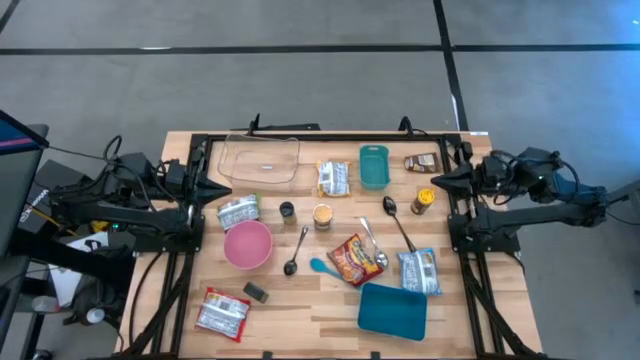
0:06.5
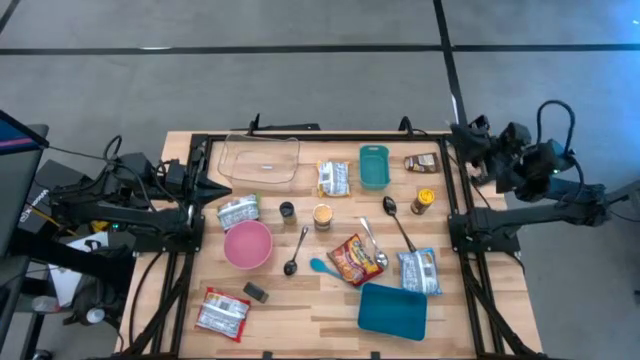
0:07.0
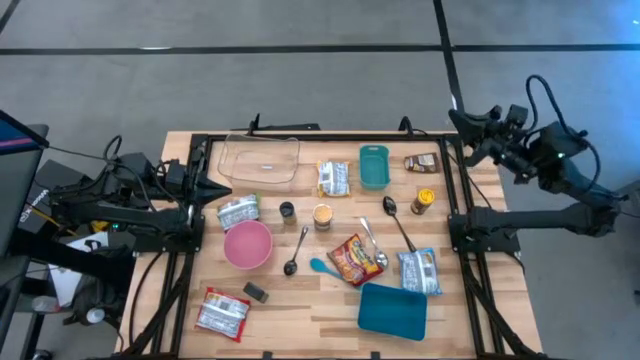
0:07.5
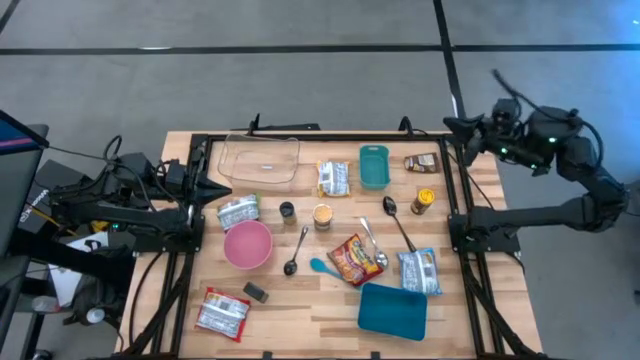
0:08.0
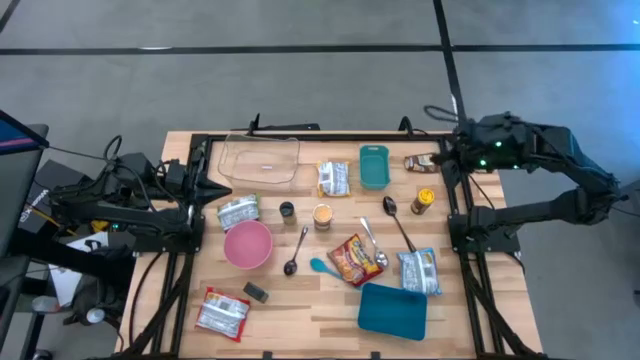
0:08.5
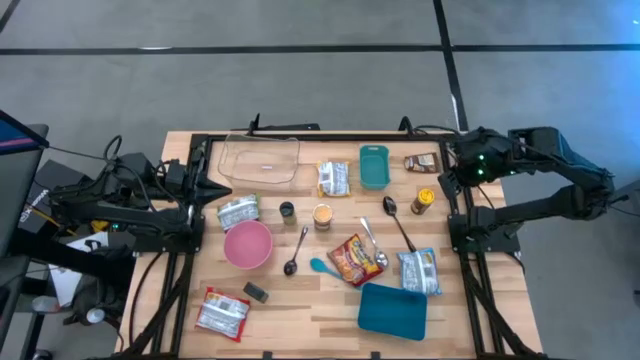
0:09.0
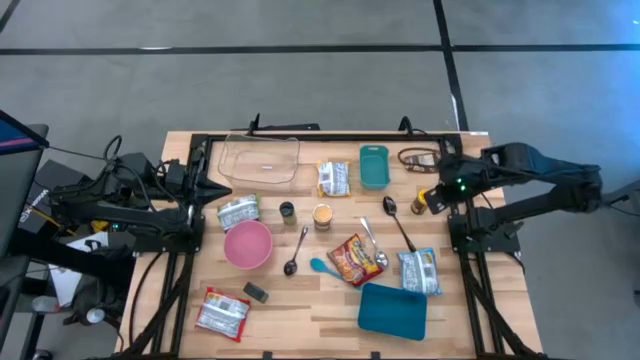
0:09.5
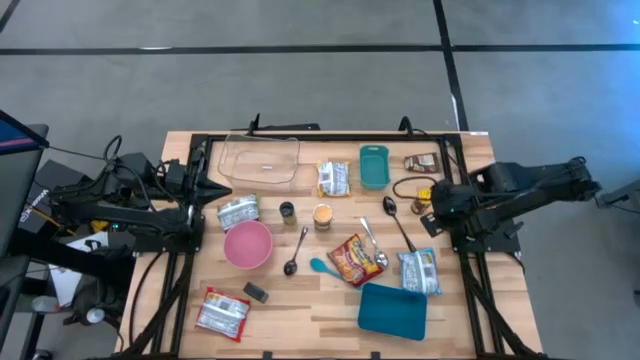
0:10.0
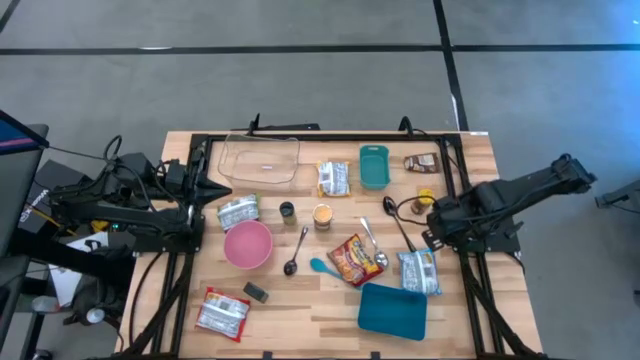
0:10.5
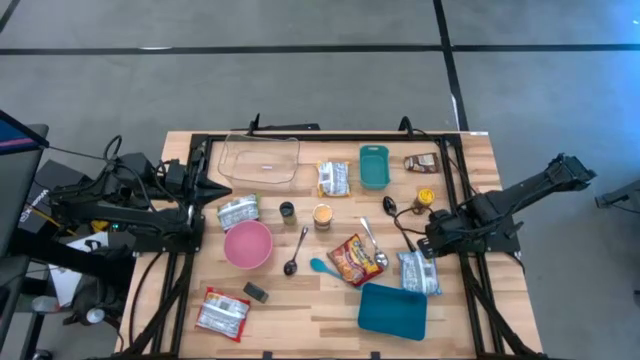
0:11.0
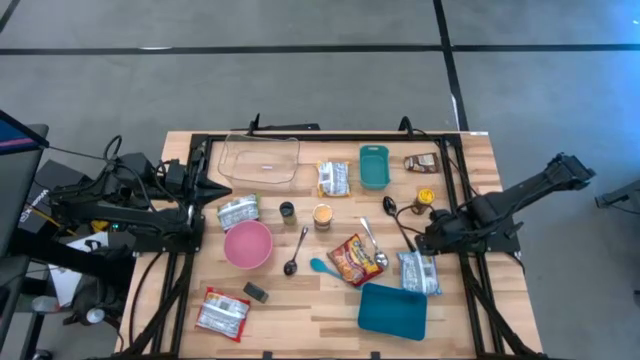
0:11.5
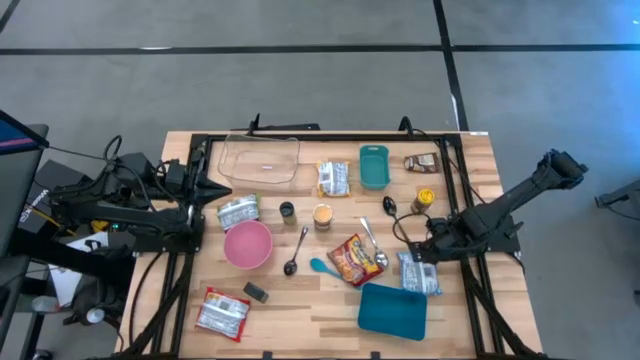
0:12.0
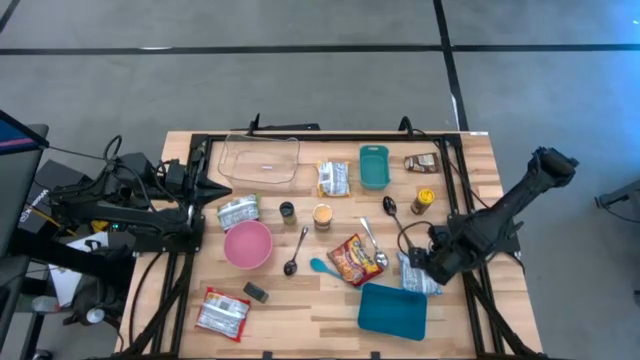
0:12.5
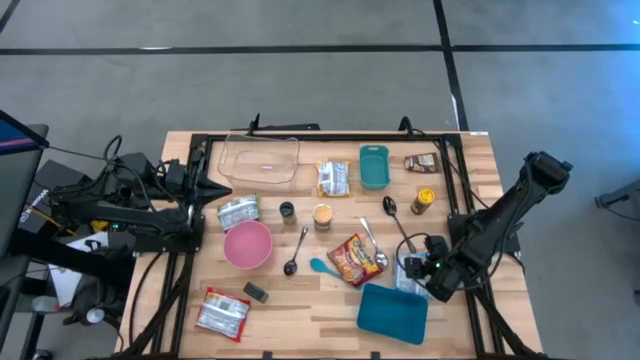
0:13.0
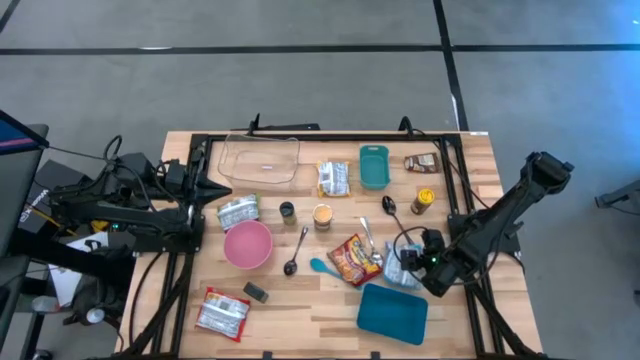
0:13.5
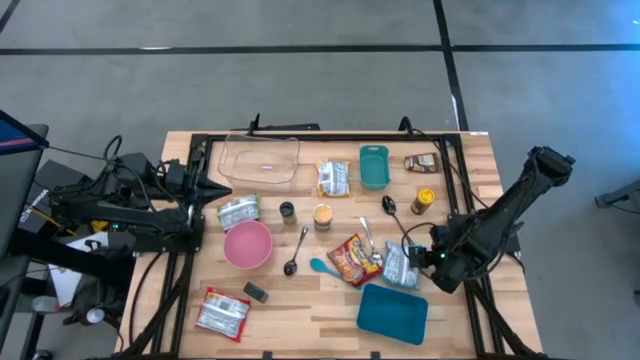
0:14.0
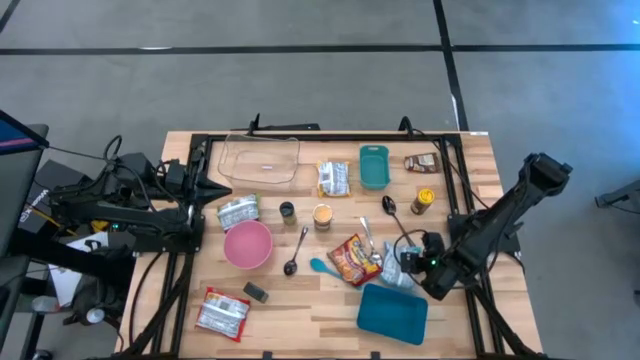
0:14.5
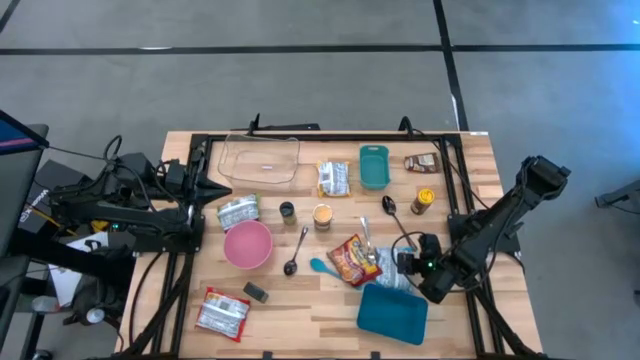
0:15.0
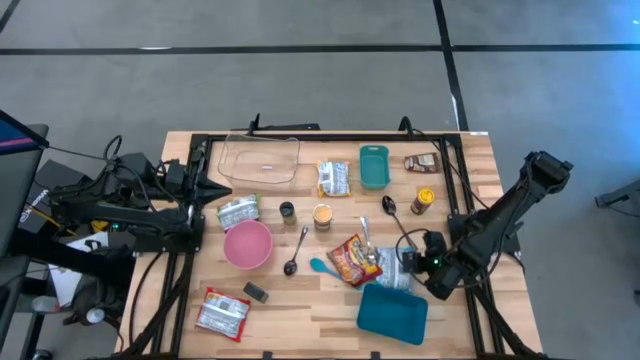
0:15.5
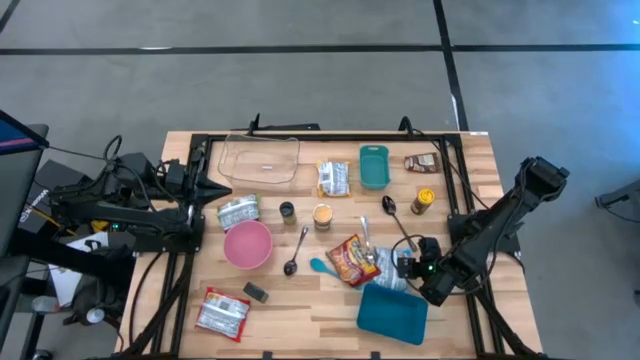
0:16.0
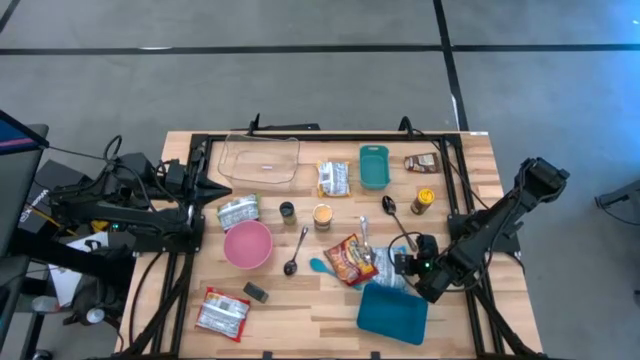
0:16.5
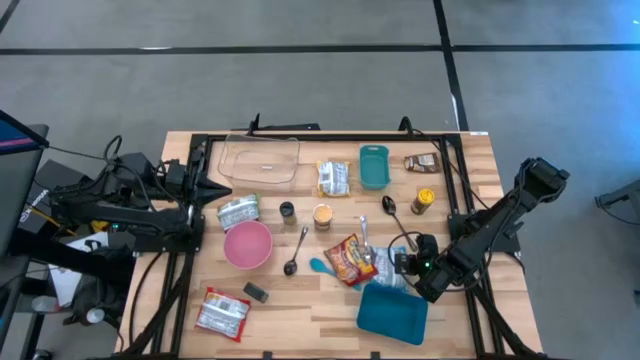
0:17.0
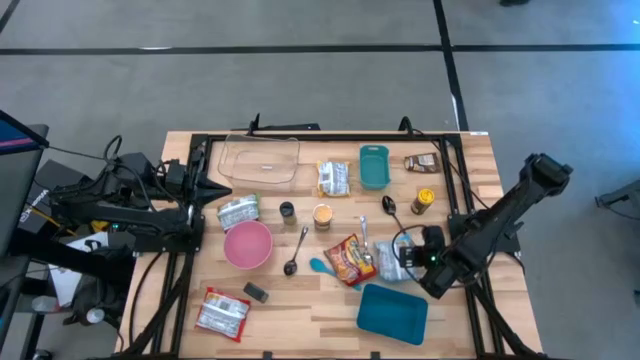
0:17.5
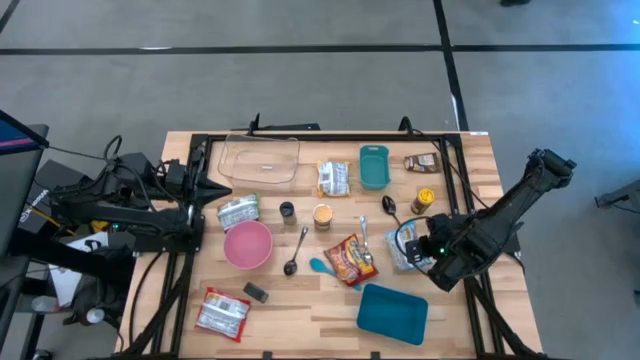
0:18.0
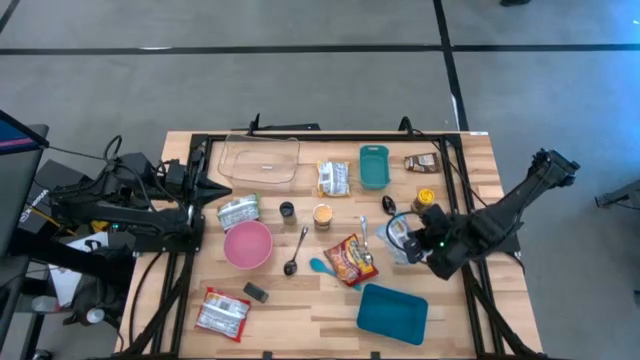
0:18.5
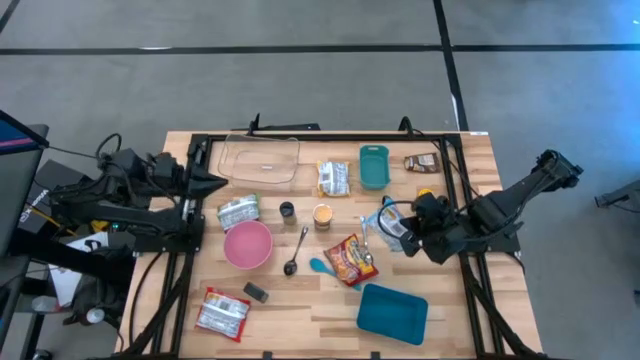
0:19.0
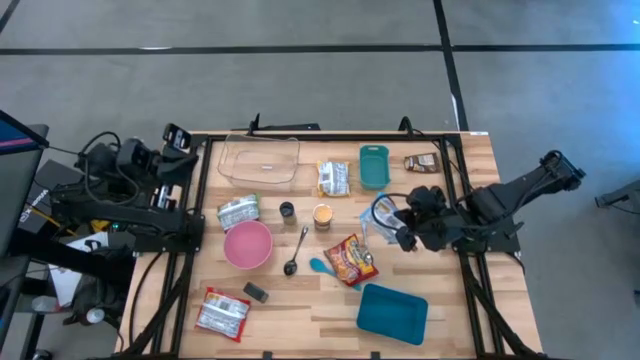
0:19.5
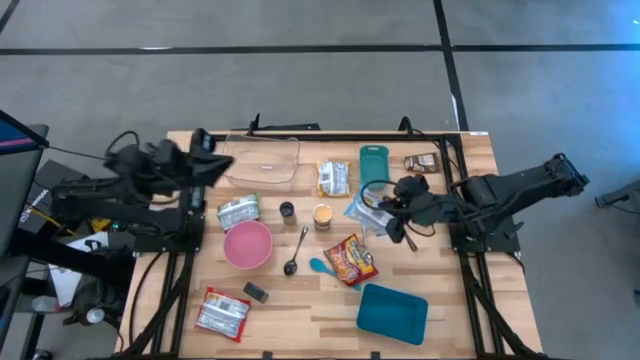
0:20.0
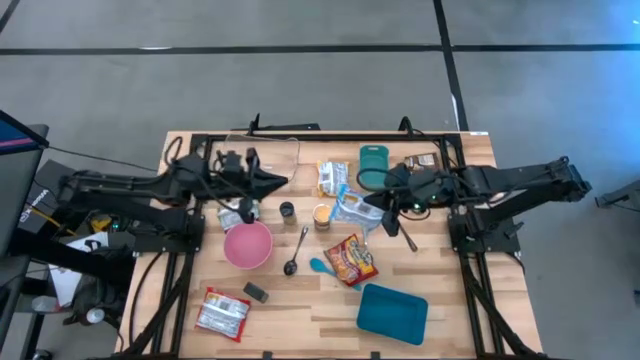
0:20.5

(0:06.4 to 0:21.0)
Task: Pick & Place Food Item
Put the blue noodle pack into the transparent bin
